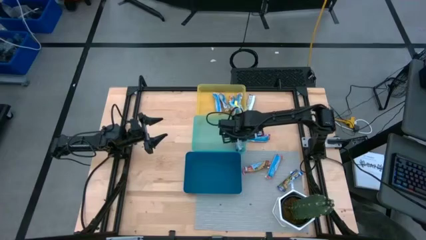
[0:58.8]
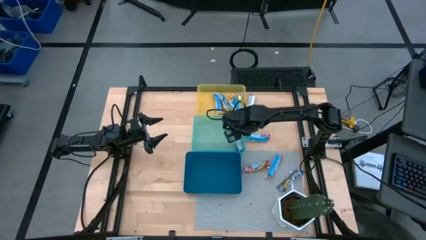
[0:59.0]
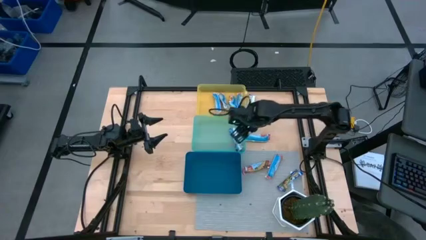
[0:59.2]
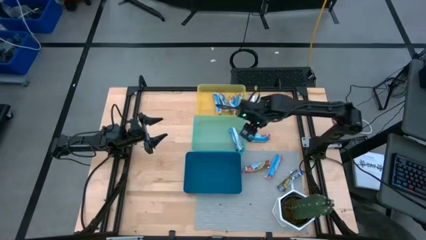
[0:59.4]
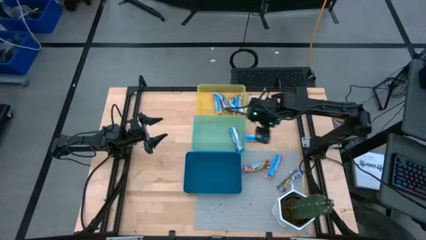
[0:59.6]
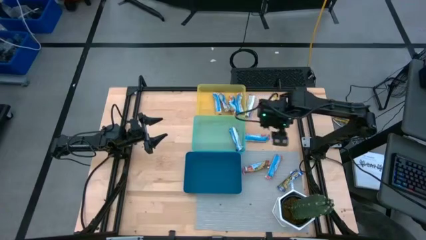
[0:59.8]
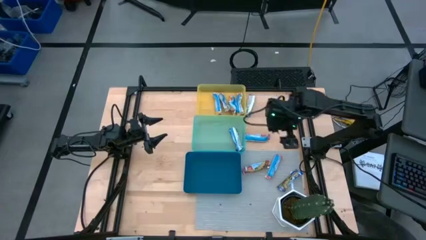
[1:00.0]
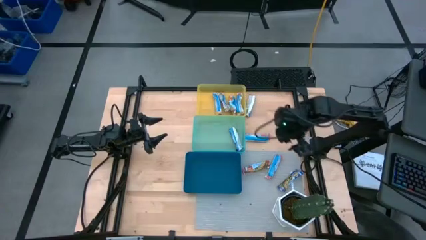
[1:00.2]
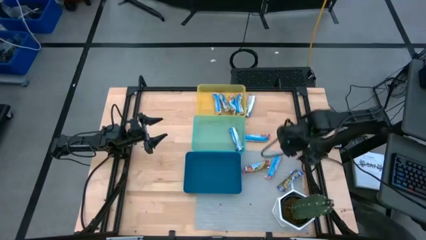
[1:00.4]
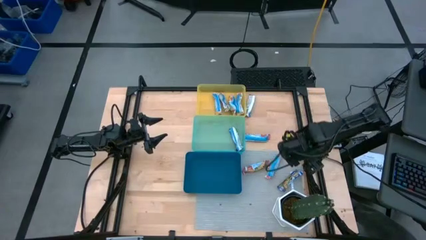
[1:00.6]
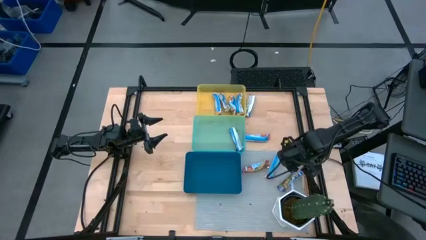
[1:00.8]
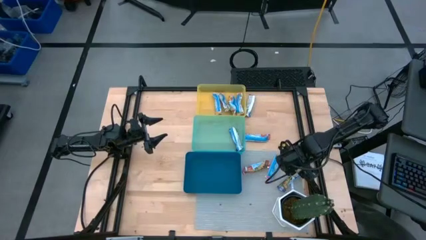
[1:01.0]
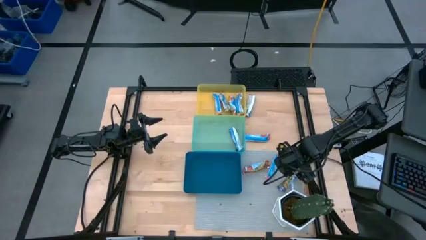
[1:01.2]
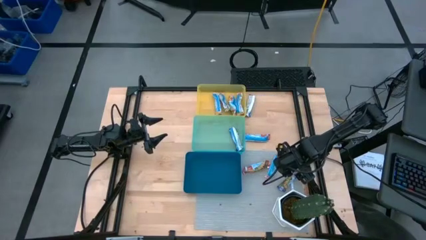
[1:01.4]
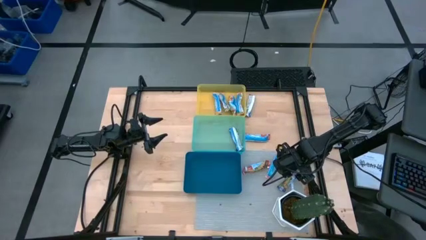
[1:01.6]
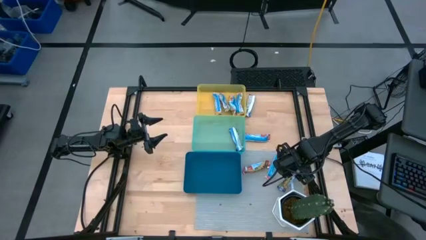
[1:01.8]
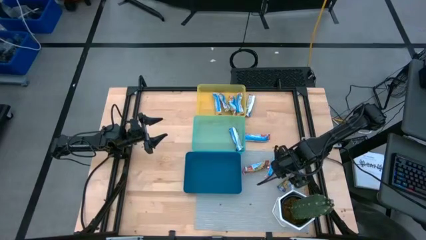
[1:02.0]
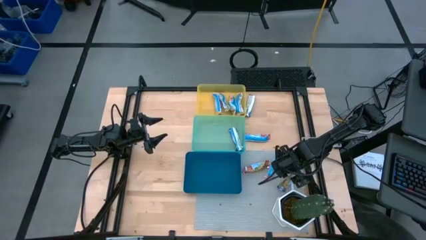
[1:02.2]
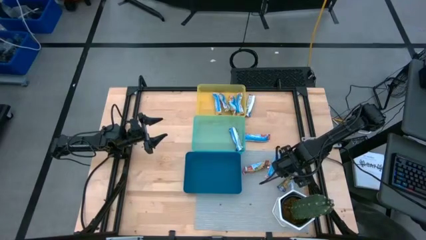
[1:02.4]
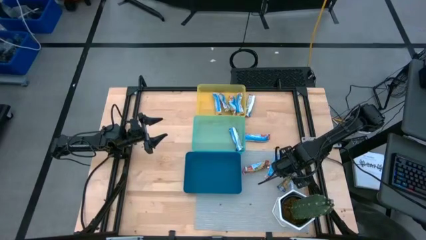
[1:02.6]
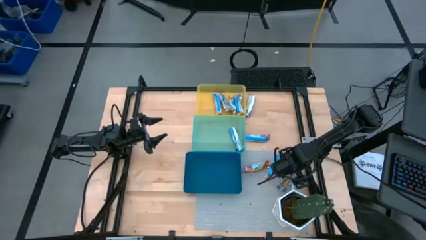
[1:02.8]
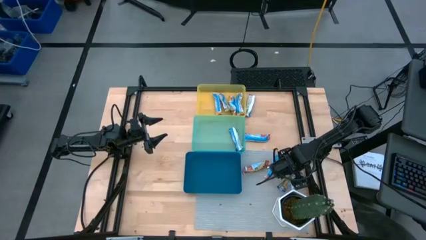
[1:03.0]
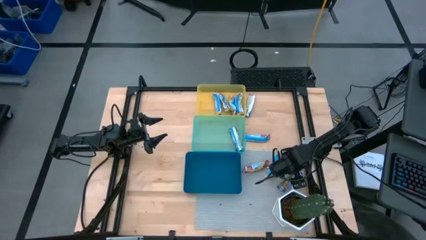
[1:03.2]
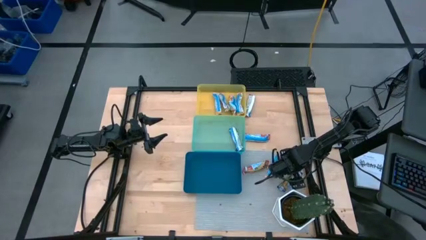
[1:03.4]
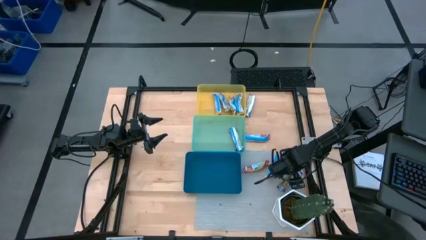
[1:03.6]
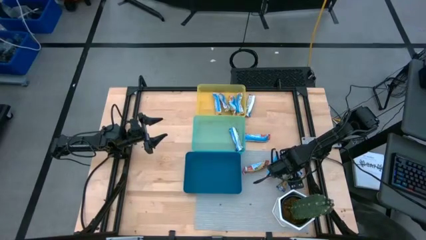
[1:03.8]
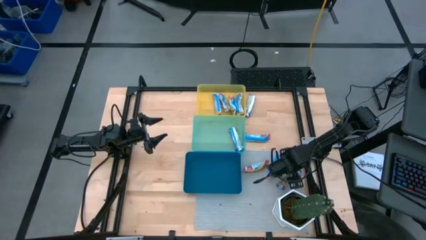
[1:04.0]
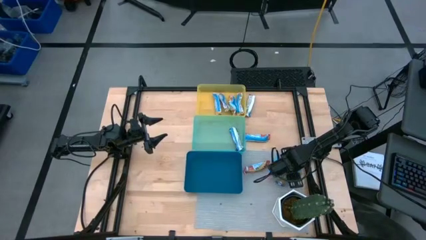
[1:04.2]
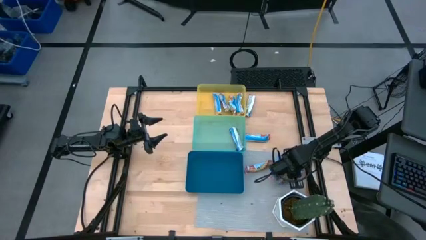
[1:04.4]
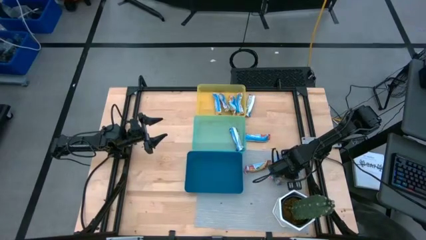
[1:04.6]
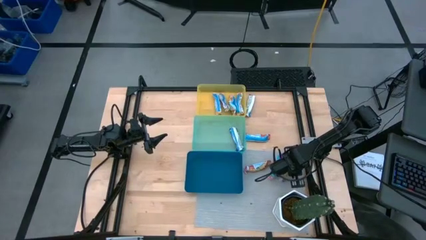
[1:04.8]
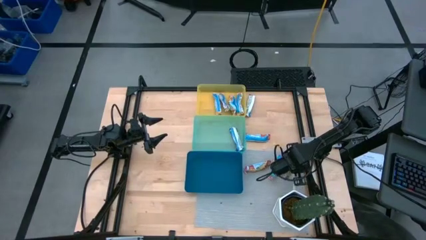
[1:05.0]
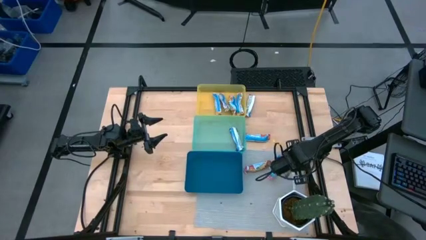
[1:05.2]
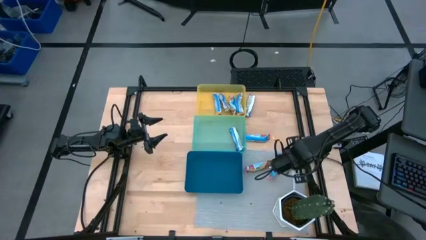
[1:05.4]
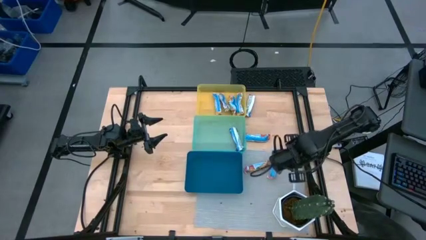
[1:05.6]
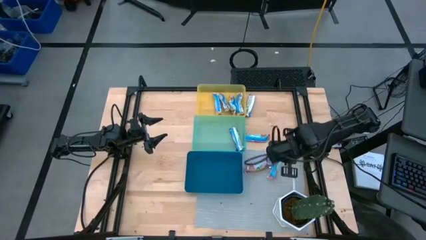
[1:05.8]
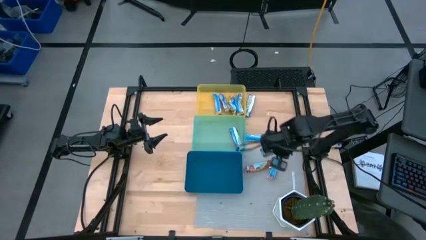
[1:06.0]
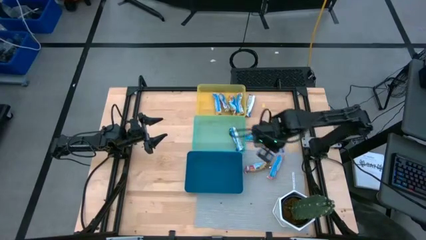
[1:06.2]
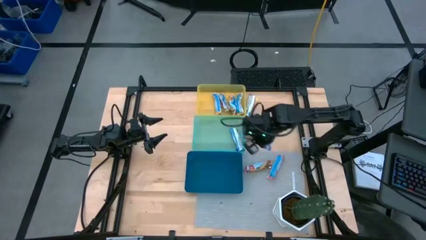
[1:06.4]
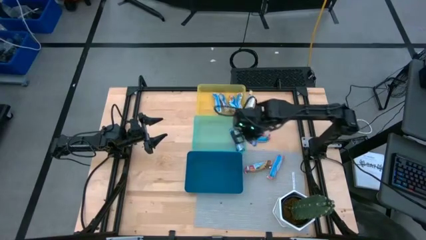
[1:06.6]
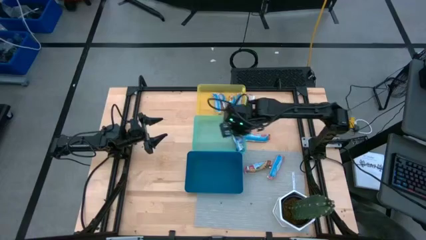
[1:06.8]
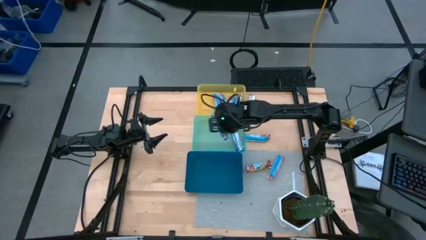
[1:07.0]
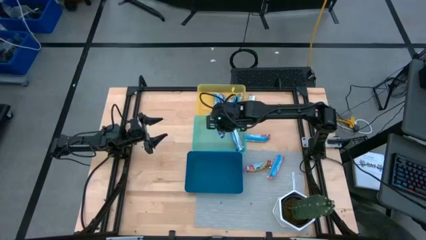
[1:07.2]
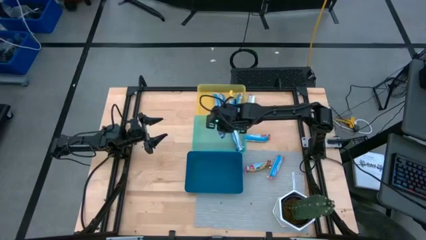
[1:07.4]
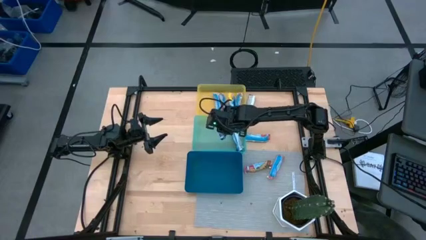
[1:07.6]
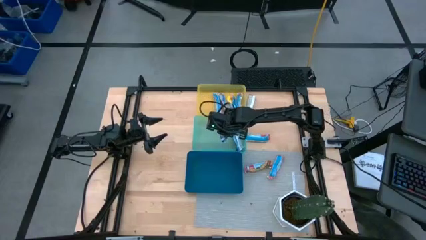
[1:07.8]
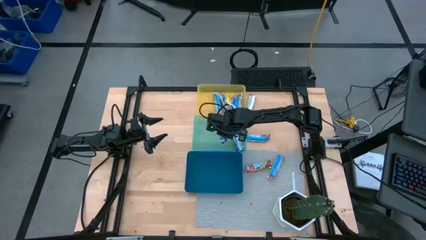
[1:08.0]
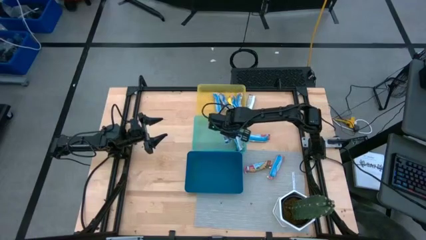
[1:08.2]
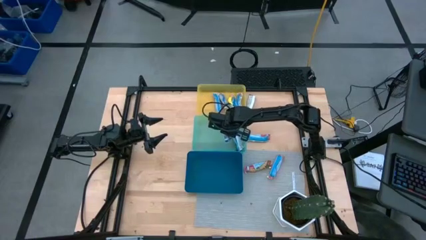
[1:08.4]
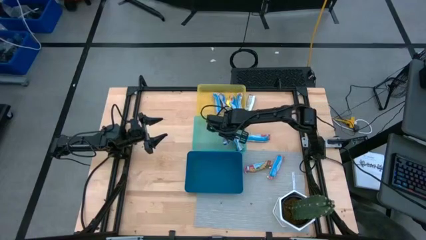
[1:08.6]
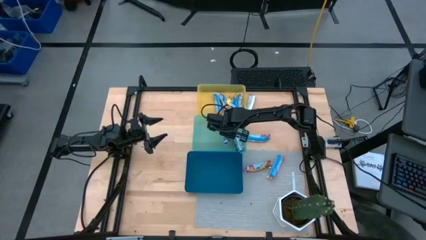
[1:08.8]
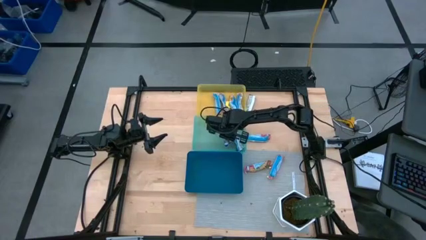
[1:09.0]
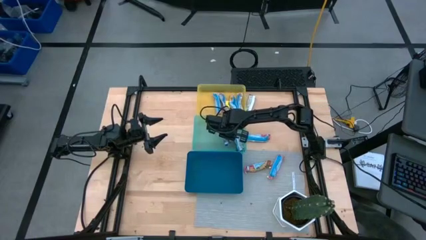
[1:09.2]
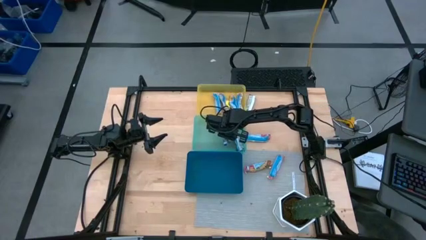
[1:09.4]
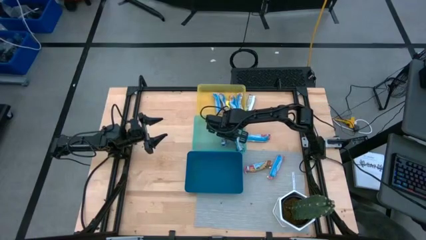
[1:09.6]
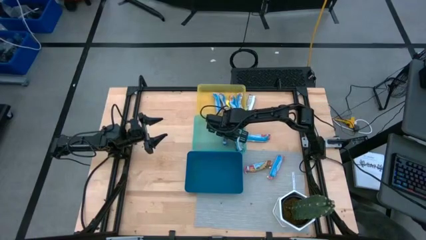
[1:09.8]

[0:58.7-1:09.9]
Task: Pick and place Granola Bars by type
Put the blue granola bar into the green bin
